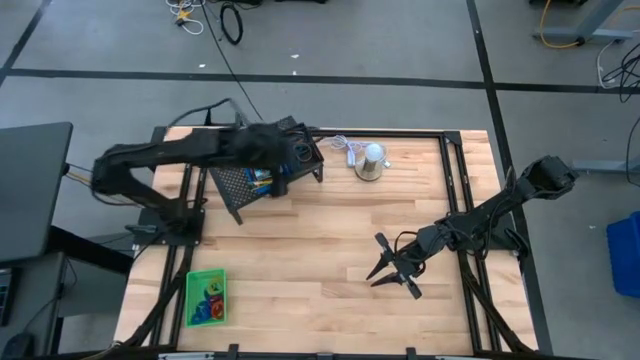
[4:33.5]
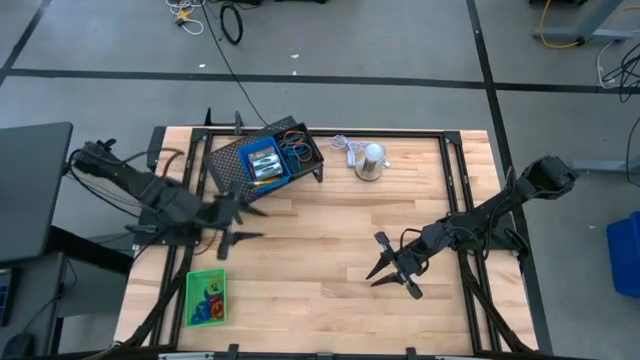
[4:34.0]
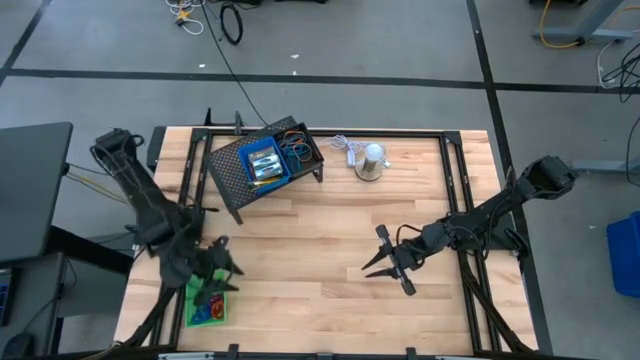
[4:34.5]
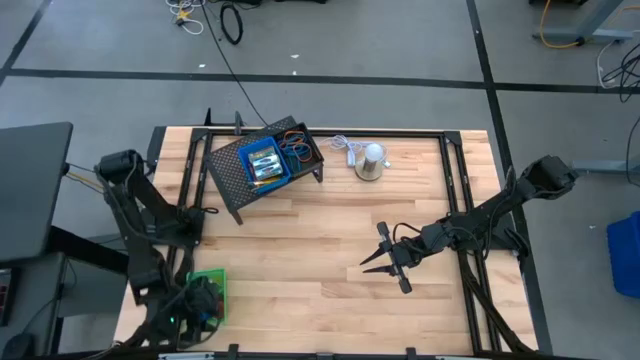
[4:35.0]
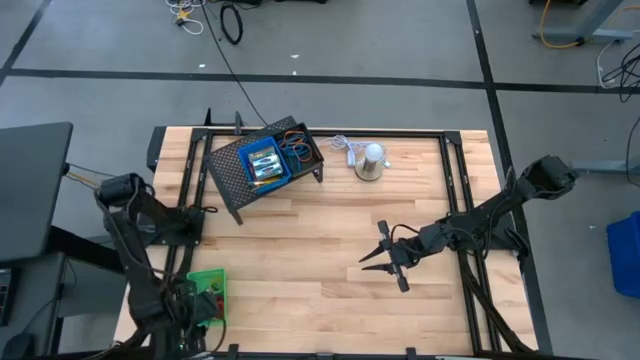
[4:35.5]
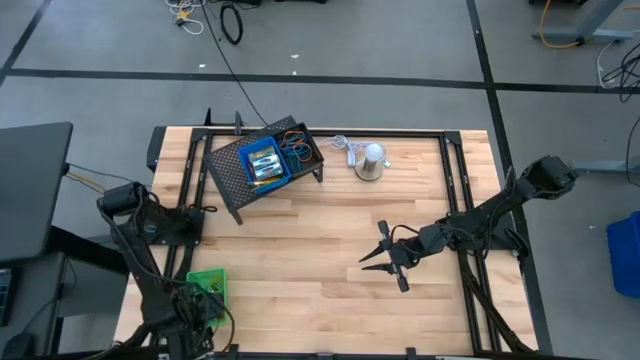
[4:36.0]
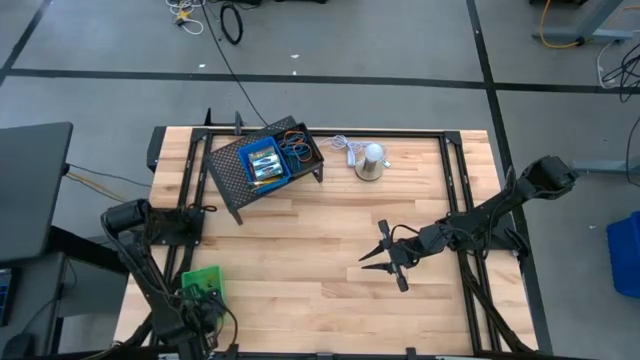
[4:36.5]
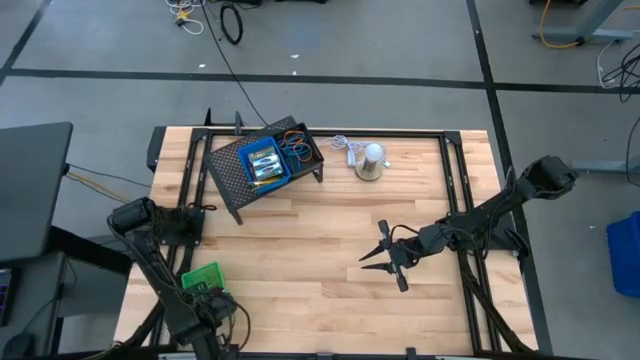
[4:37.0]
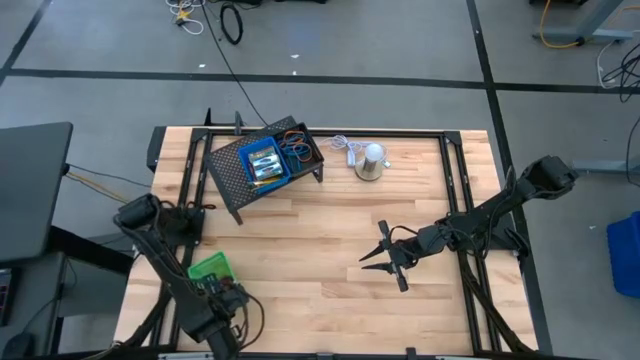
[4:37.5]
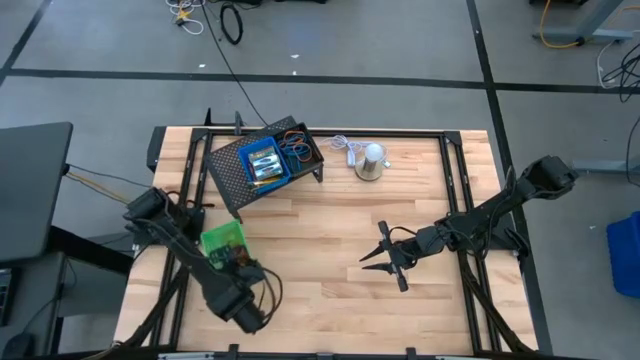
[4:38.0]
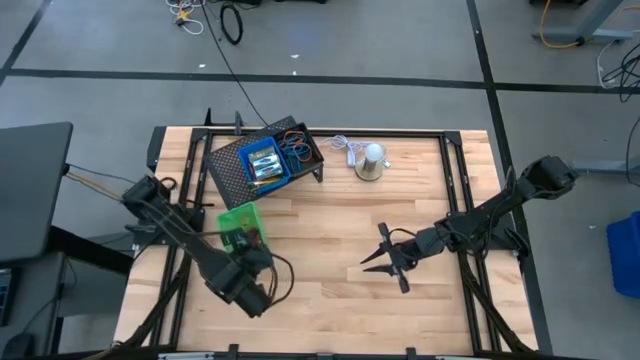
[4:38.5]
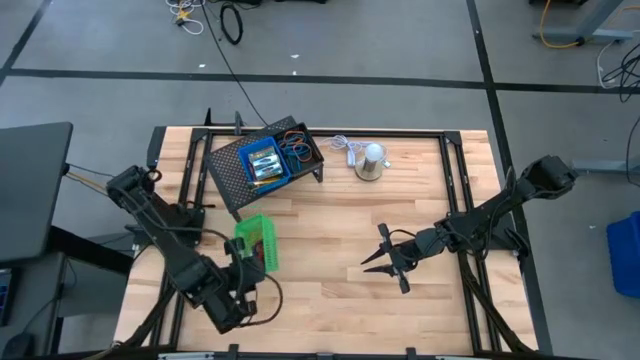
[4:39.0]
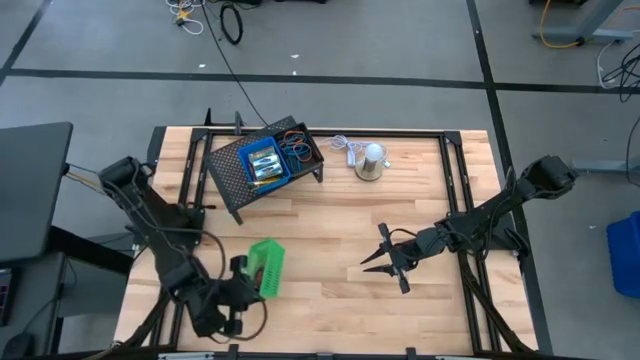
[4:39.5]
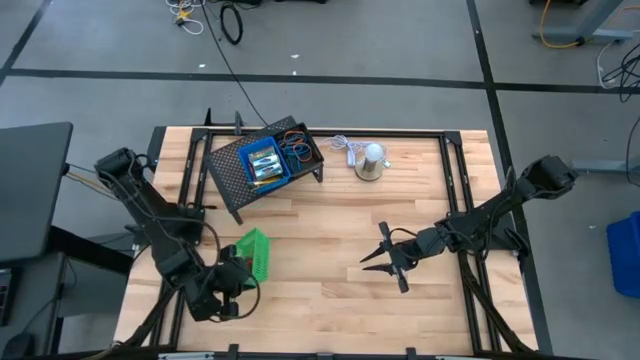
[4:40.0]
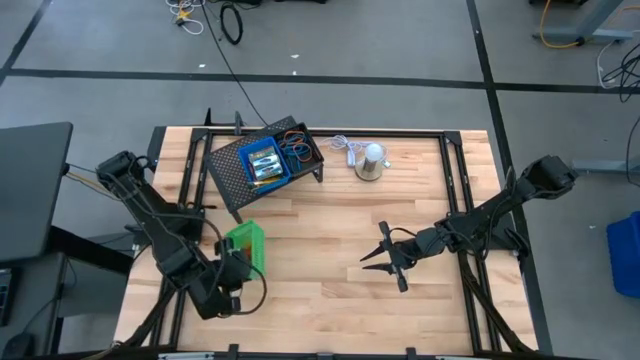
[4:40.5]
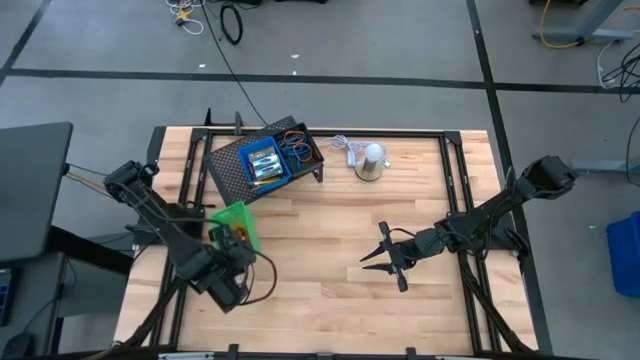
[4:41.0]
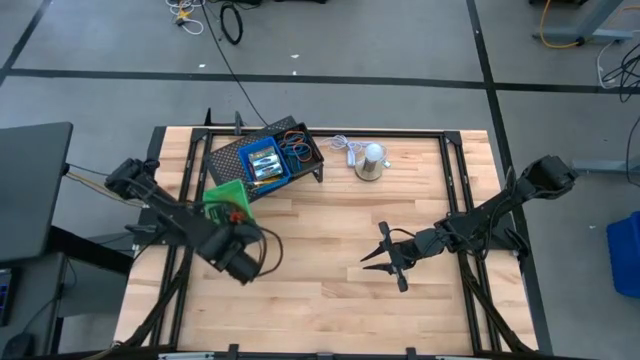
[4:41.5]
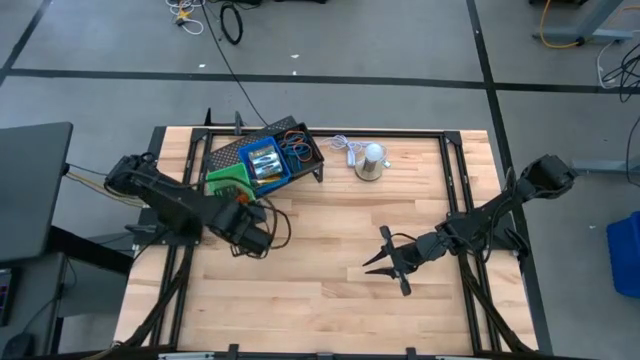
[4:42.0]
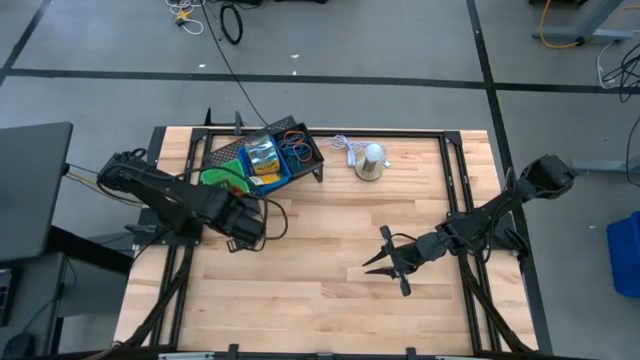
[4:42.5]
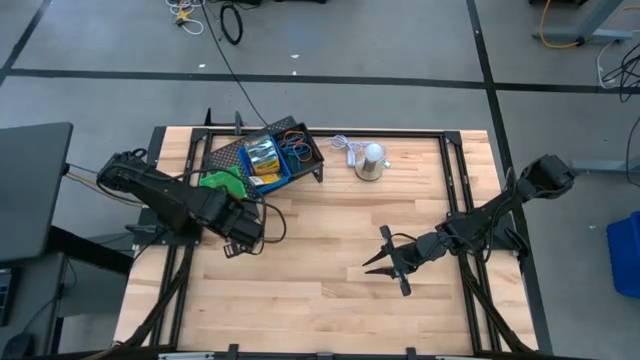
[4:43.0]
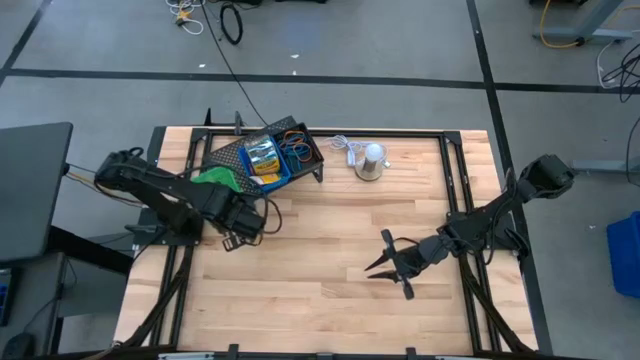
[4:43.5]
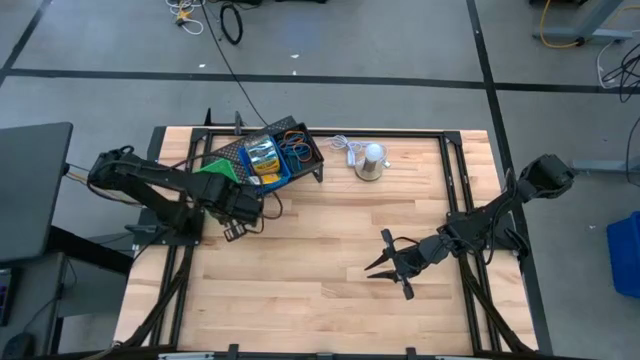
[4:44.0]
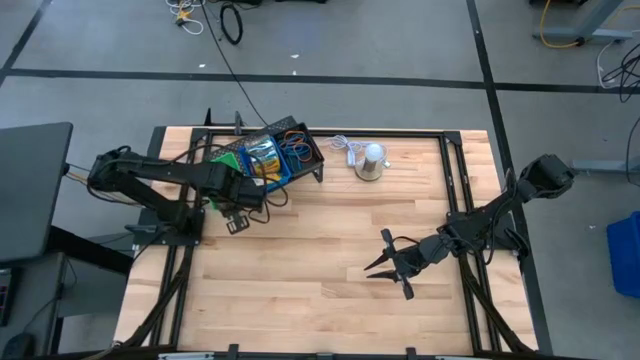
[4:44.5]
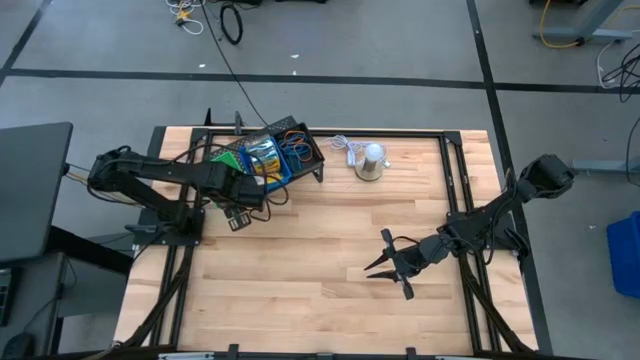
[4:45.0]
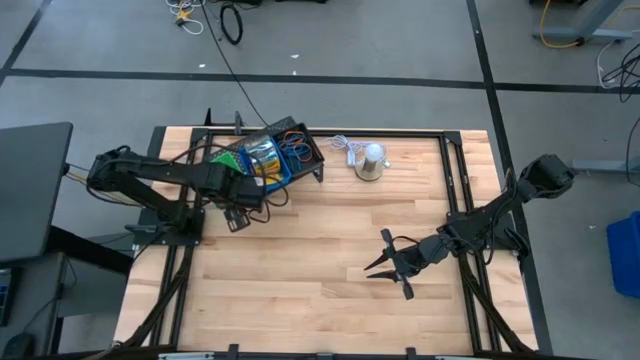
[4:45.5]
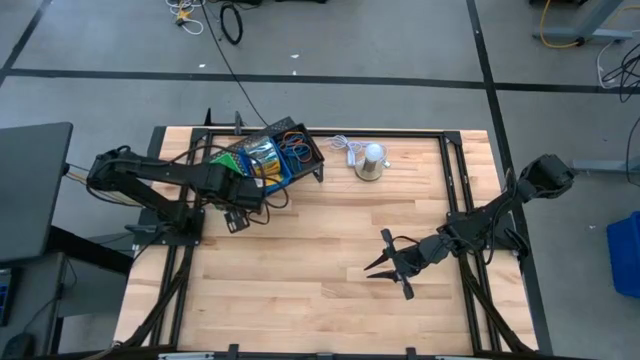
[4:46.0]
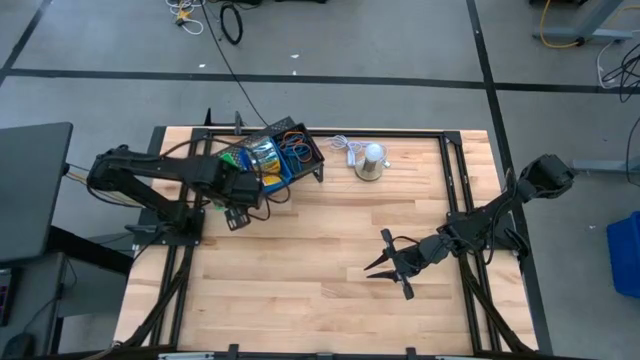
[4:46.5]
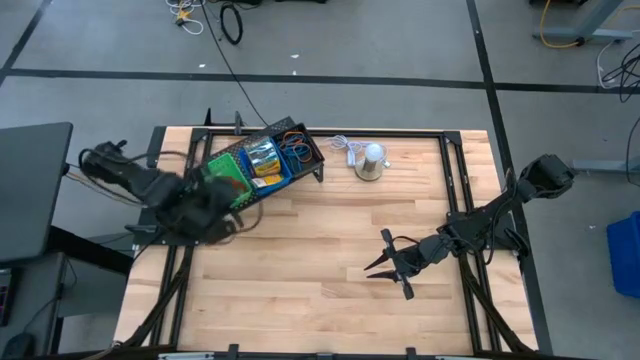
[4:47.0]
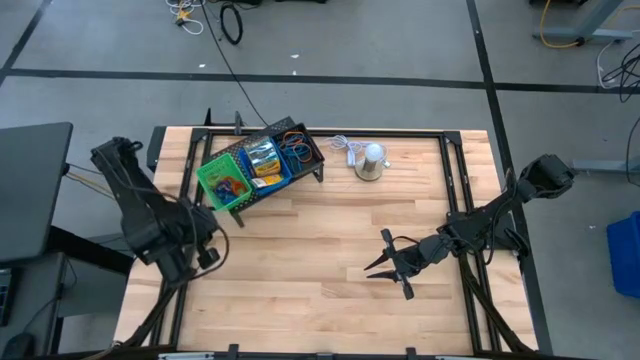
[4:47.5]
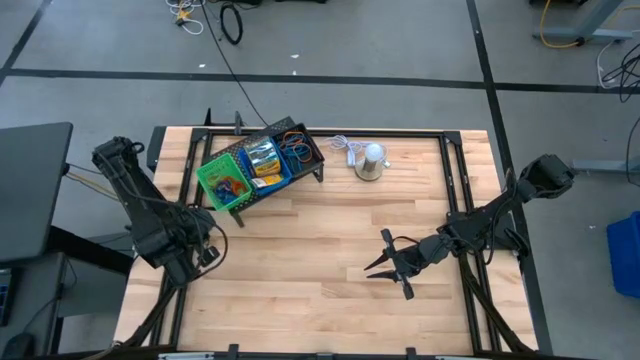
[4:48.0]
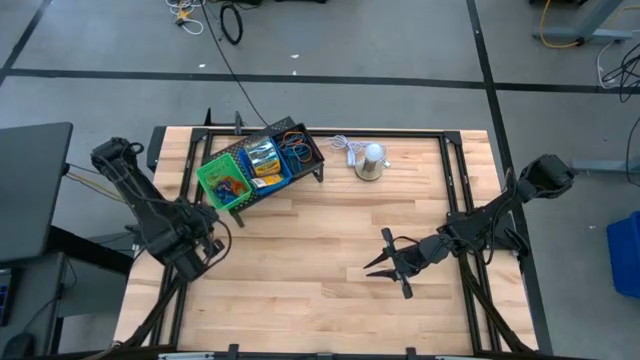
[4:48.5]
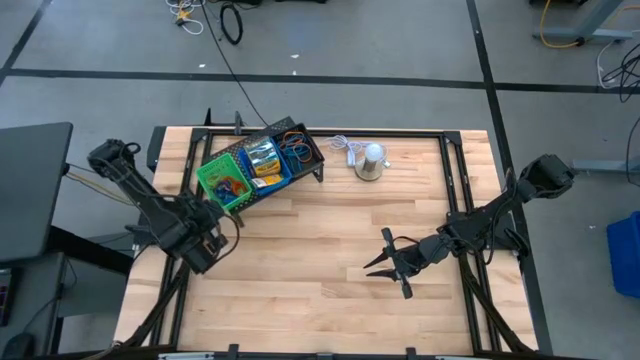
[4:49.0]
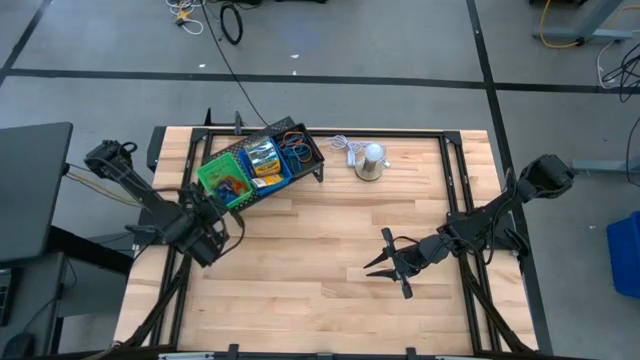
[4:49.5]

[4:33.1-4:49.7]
Task: Pick & Place Office Desk Supplies
Put the green bin with spiral keychain on the shelf
